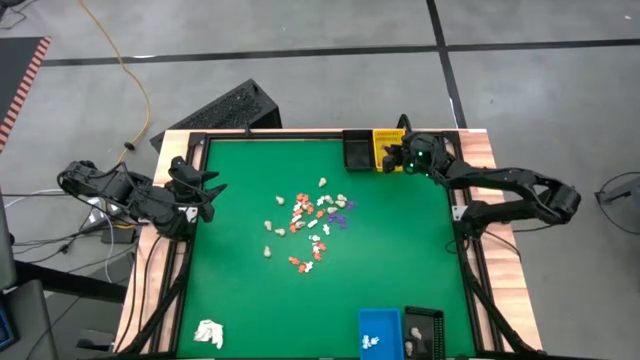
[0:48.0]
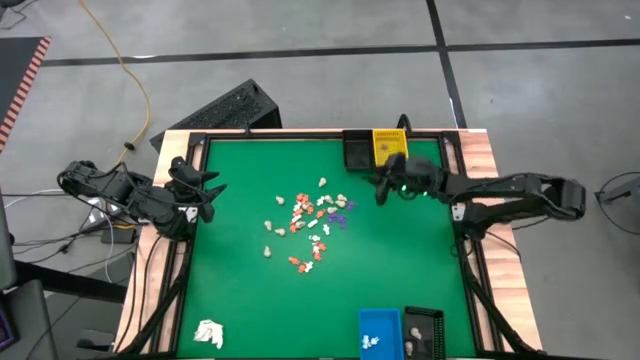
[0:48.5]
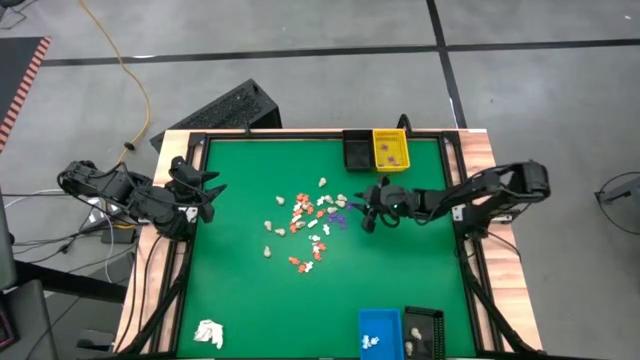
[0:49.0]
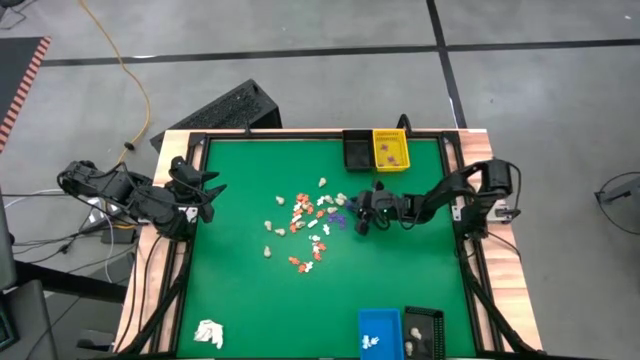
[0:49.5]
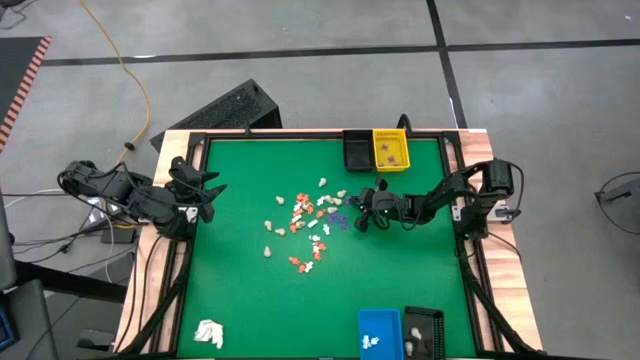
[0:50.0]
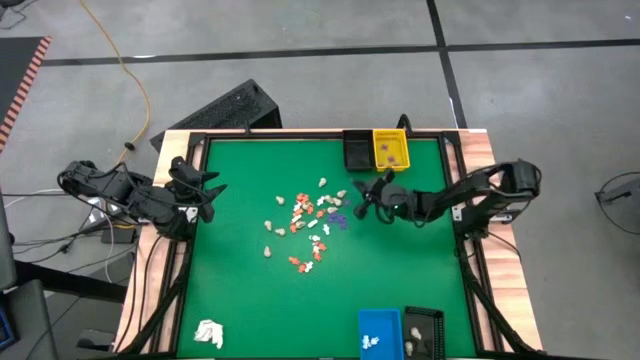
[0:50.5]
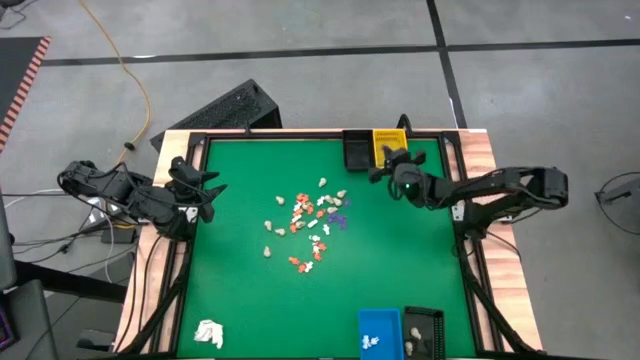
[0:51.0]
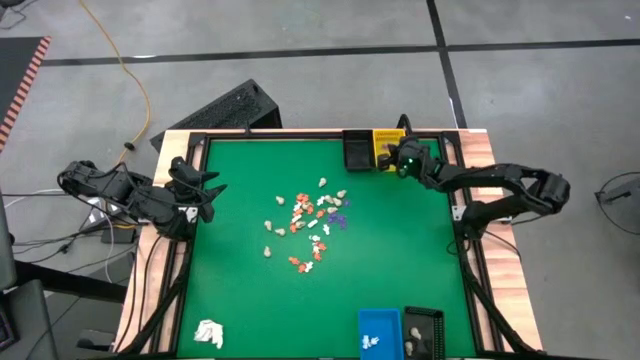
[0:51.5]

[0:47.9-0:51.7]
Task: Sort Halloween decoration
Put the violet spider toy into the yellow basket

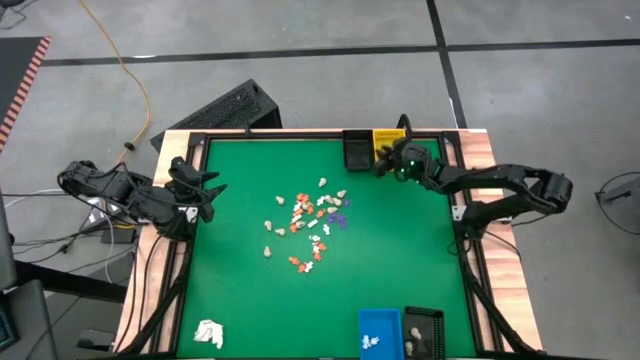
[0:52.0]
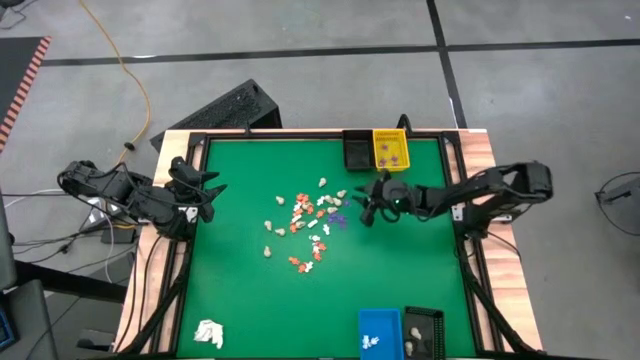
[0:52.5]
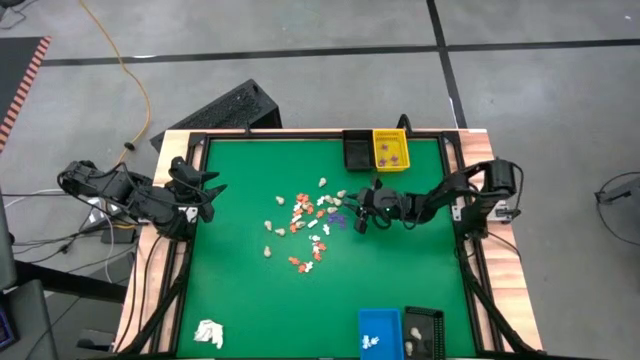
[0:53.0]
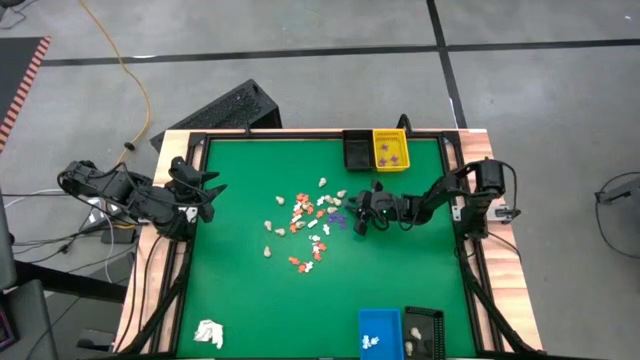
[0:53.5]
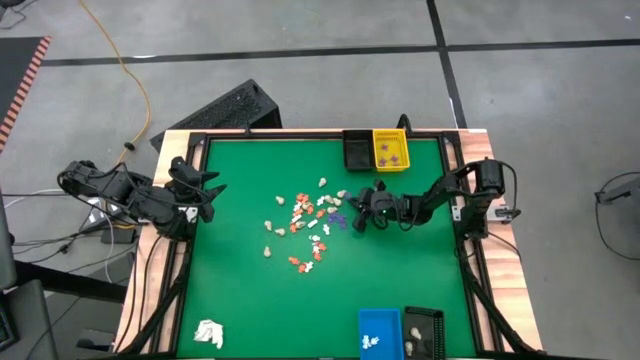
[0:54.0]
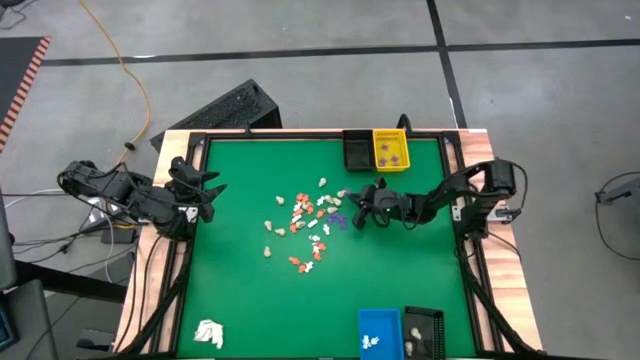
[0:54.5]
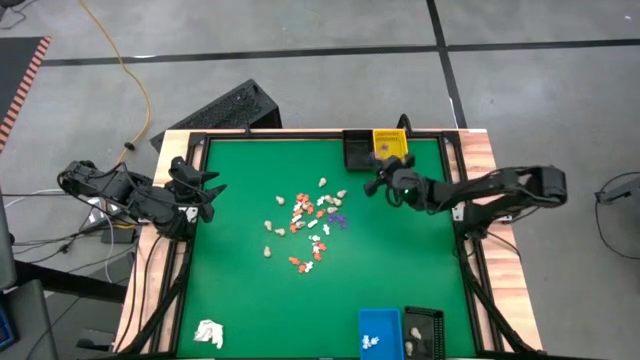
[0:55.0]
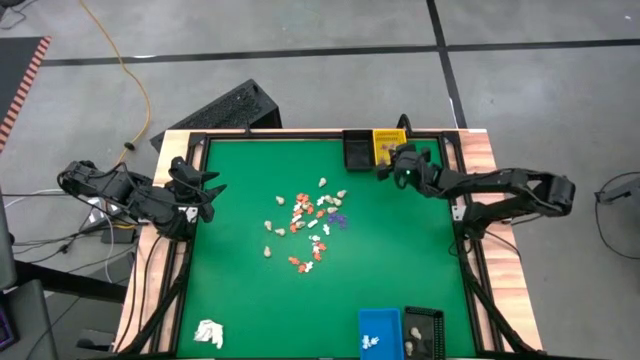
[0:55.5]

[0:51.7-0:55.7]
Put the violet spider toy into the yellow basket

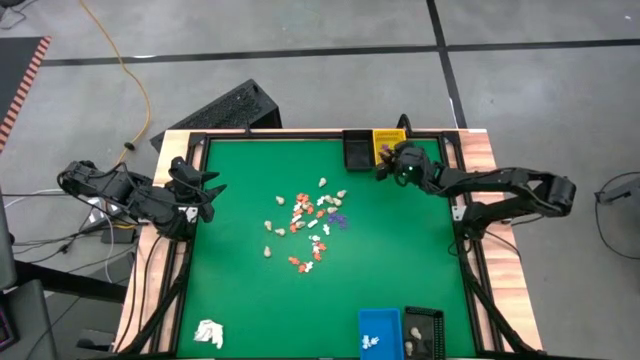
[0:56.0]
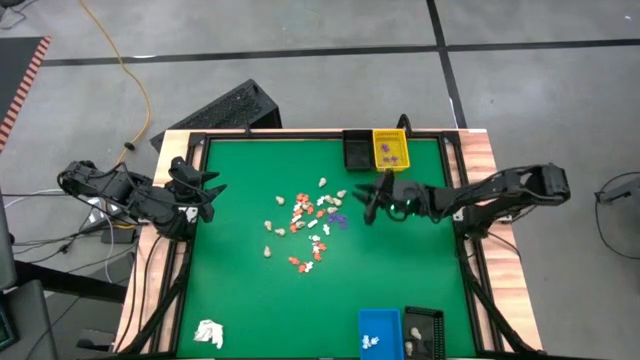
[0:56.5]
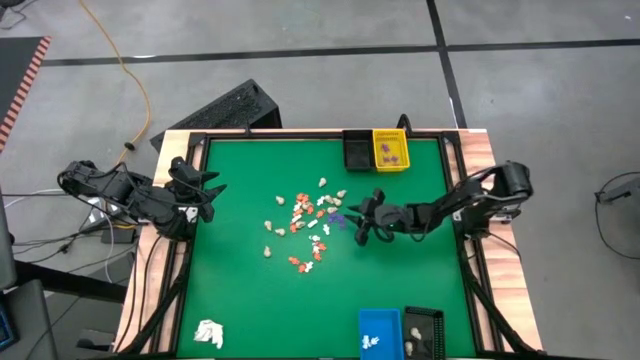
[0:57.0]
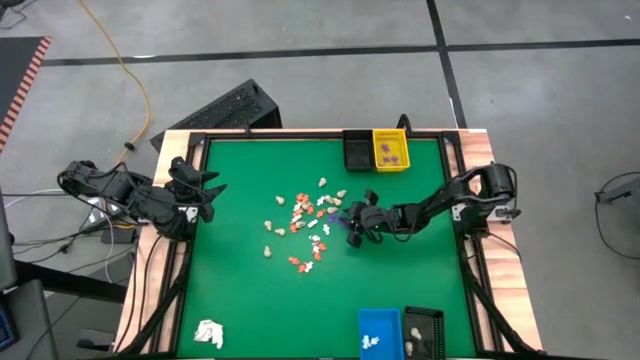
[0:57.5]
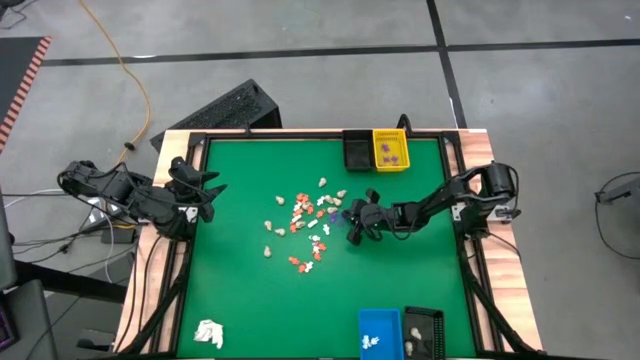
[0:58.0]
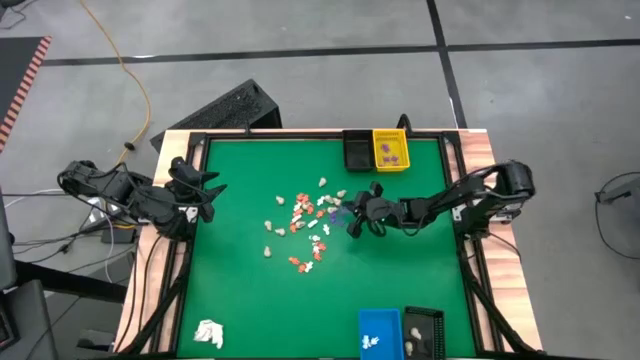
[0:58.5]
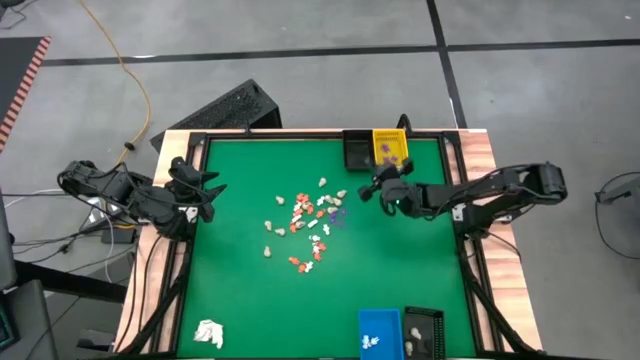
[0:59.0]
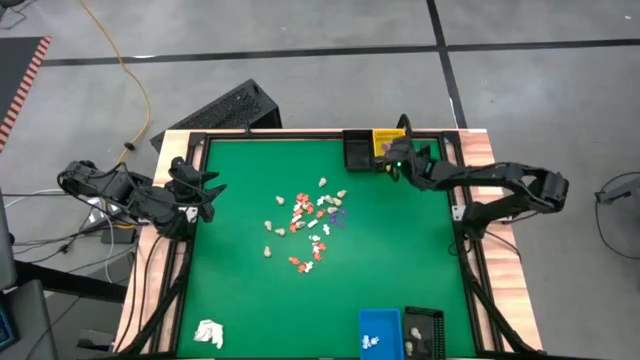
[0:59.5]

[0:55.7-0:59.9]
Put the violet spider toy into the yellow basket

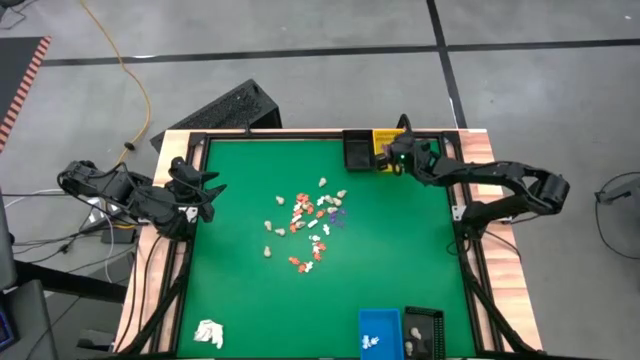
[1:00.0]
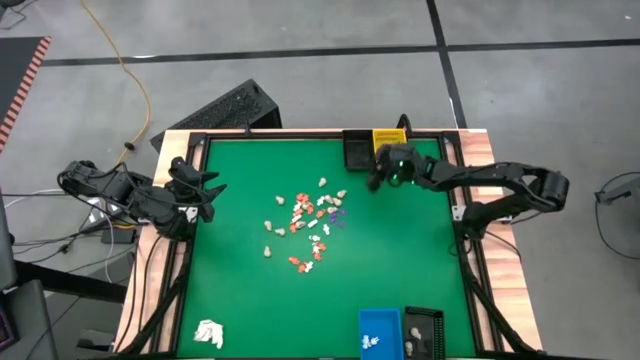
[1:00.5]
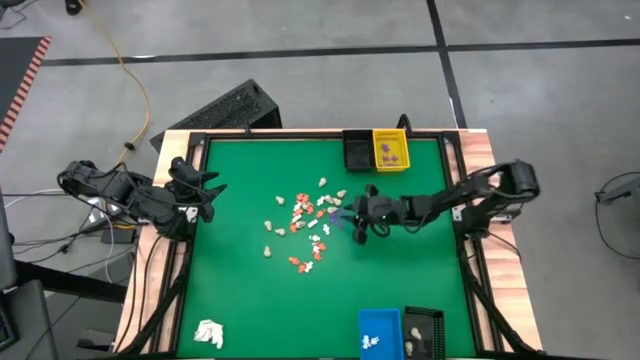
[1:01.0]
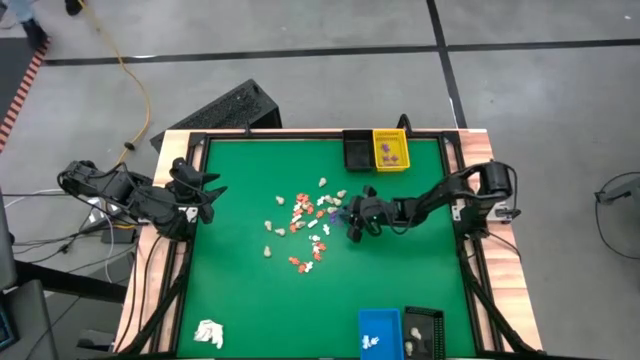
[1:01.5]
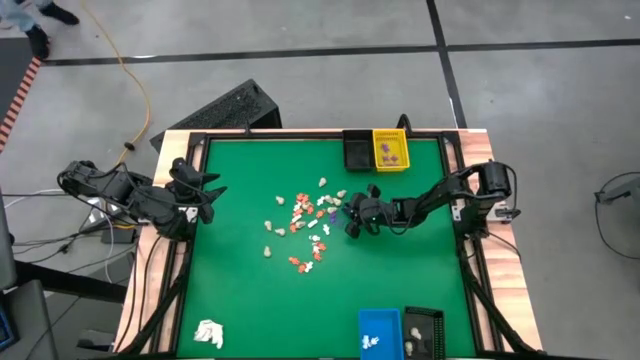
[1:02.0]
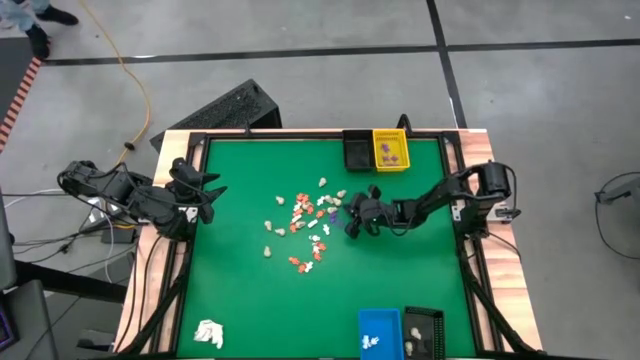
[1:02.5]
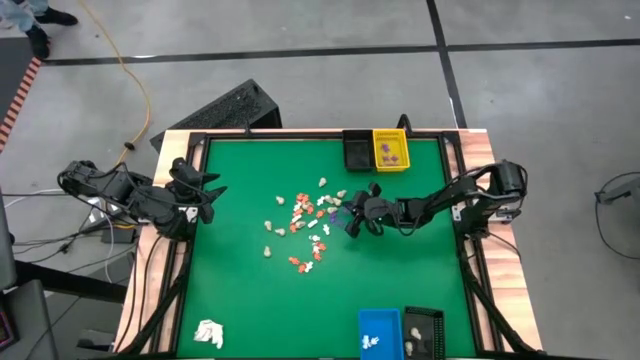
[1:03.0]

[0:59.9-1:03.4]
Put the violet spider toy into the yellow basket

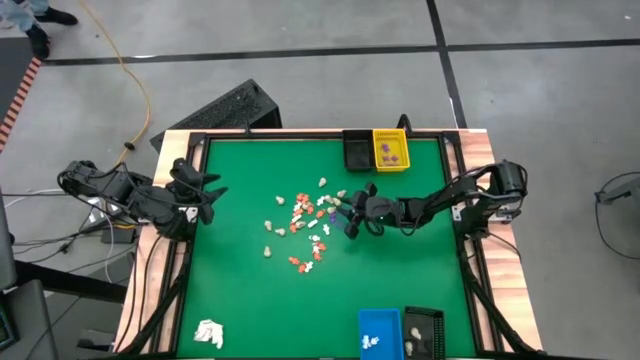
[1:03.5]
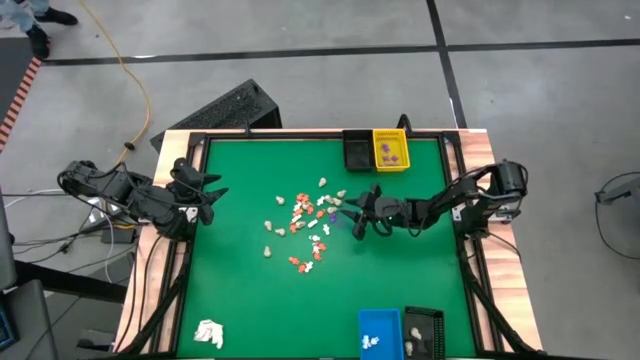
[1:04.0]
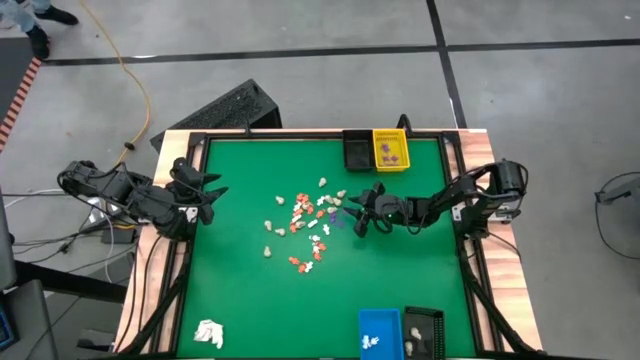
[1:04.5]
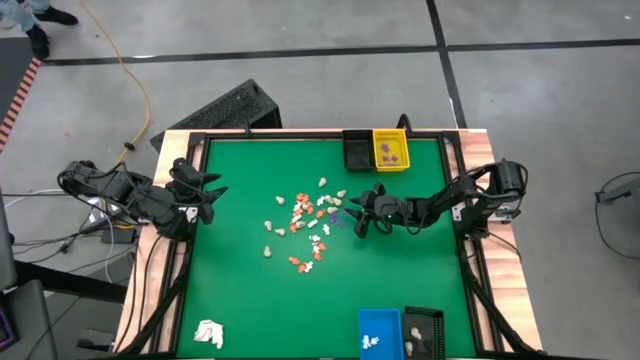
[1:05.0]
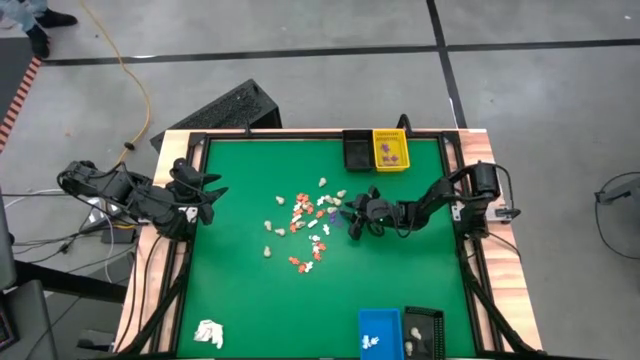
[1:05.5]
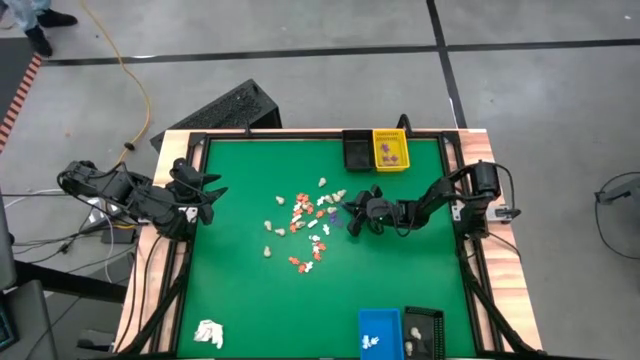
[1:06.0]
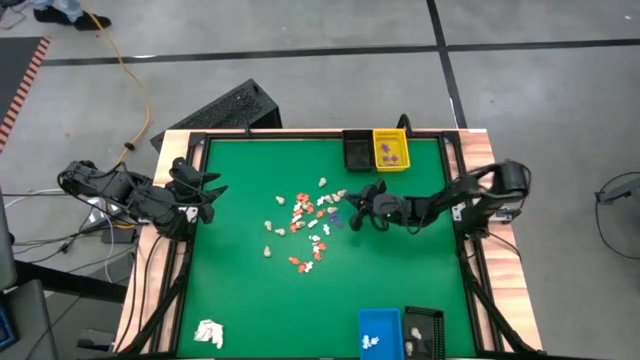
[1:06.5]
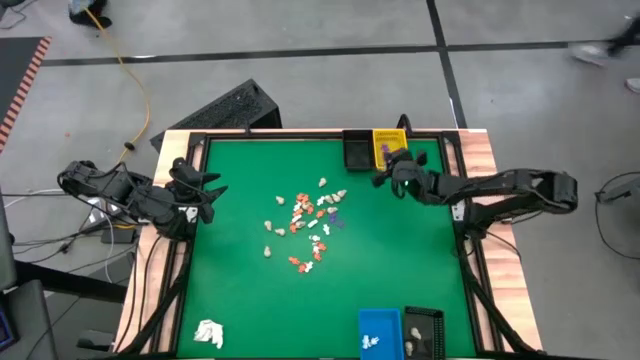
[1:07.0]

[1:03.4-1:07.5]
Put the violet spider toy into the yellow basket

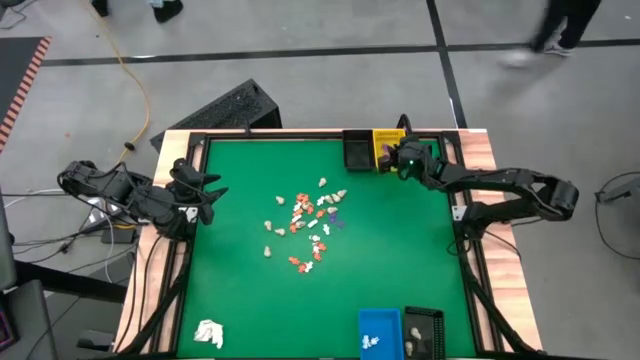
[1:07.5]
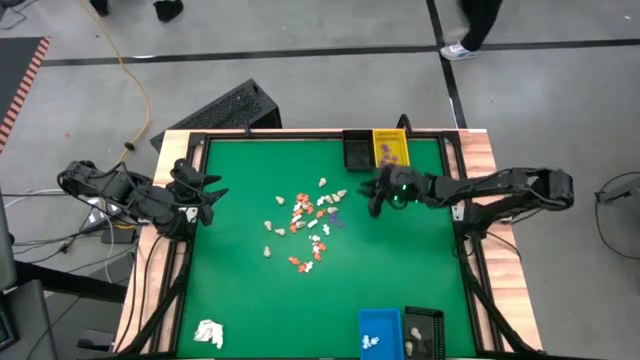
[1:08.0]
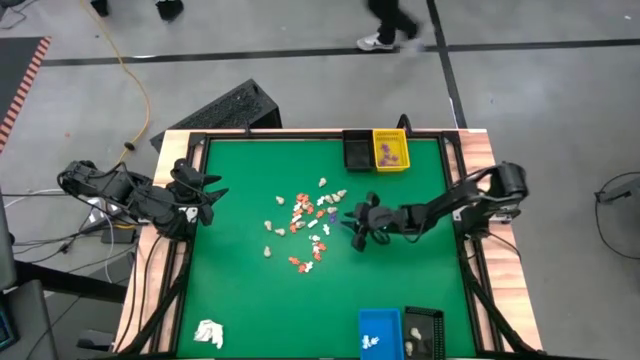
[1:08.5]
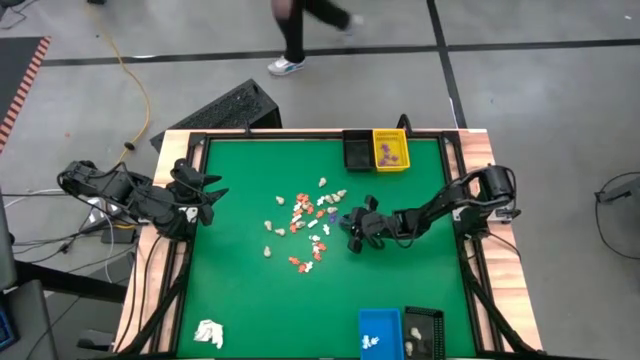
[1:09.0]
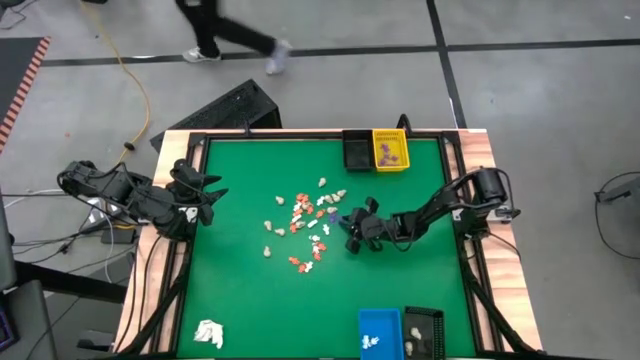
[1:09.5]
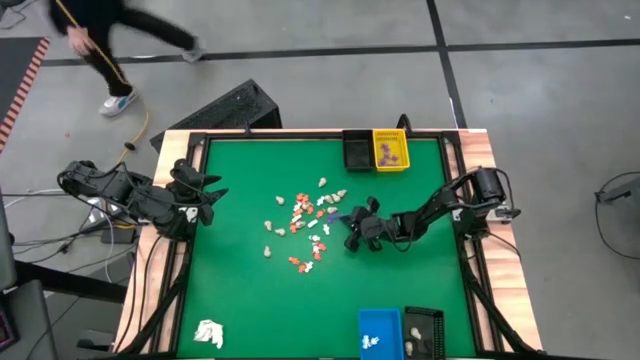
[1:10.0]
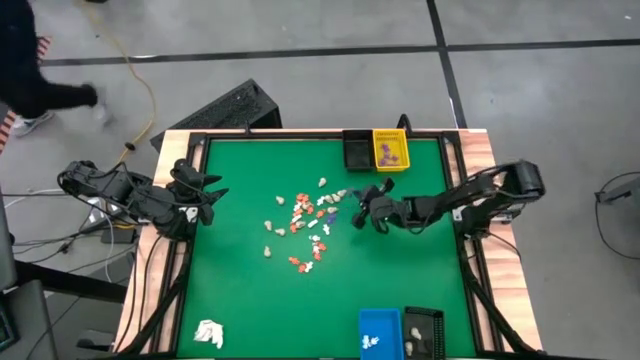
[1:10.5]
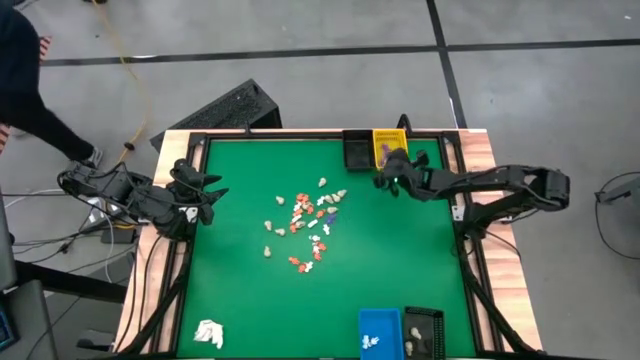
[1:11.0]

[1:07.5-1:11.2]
Put the violet spider toy into the yellow basket
